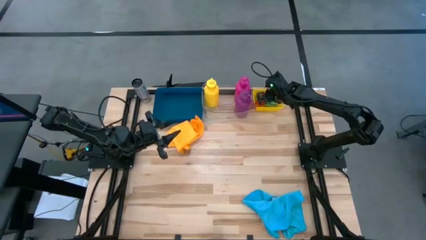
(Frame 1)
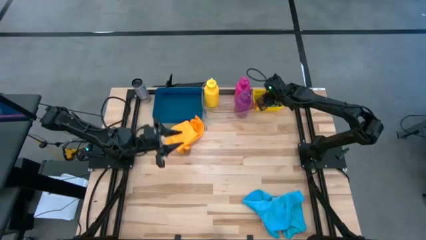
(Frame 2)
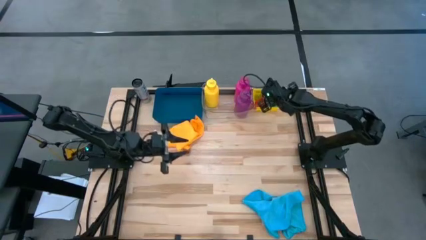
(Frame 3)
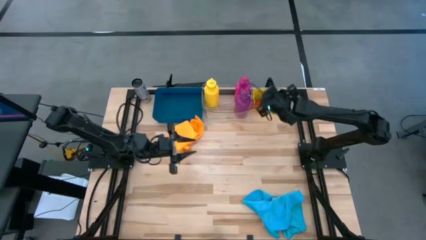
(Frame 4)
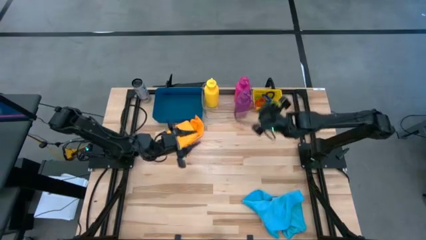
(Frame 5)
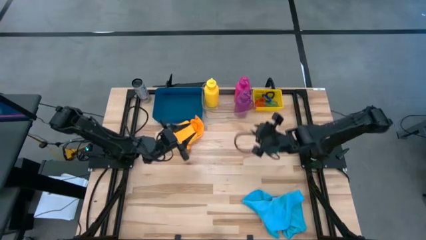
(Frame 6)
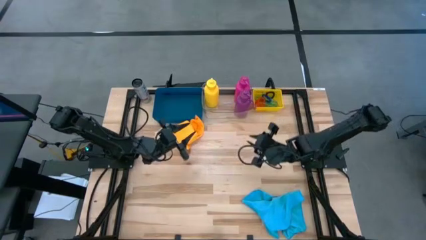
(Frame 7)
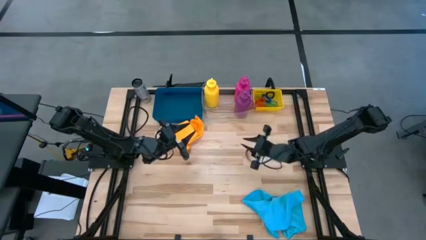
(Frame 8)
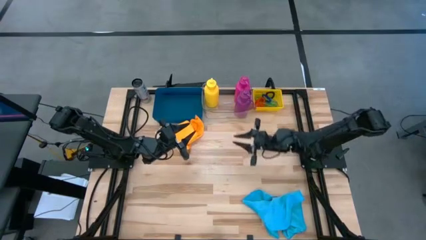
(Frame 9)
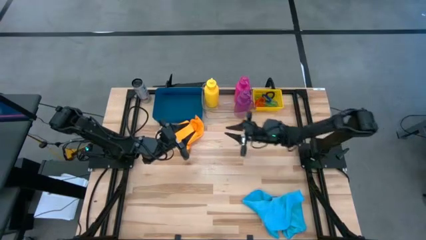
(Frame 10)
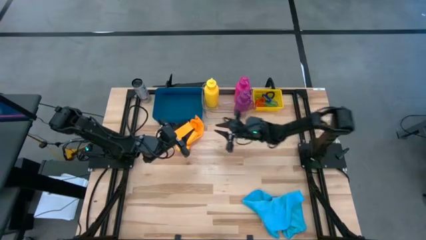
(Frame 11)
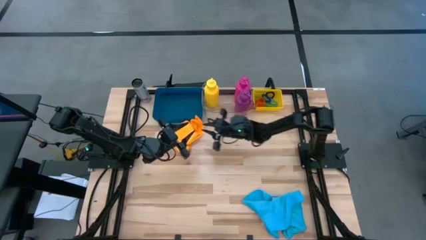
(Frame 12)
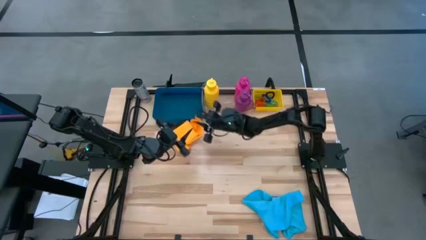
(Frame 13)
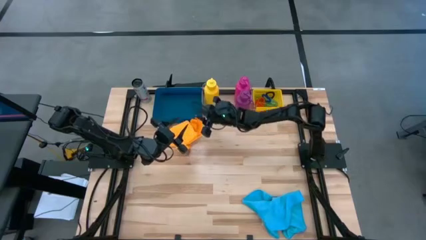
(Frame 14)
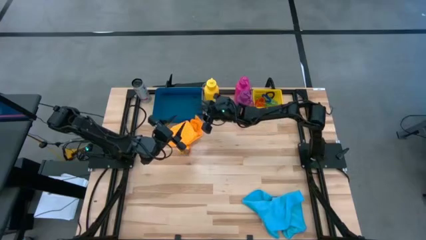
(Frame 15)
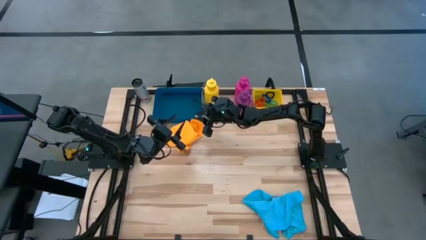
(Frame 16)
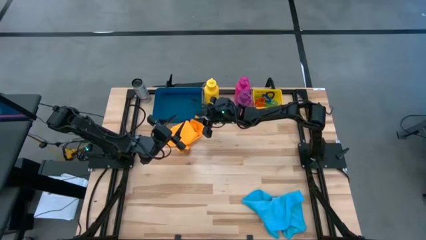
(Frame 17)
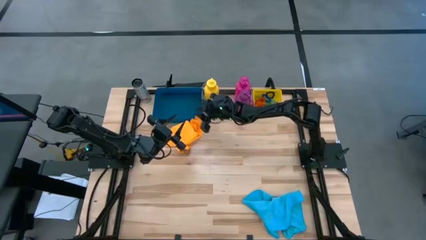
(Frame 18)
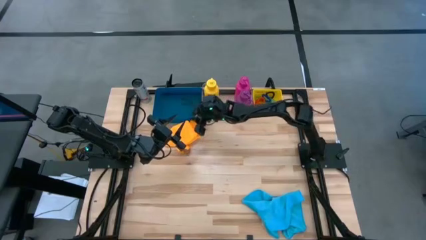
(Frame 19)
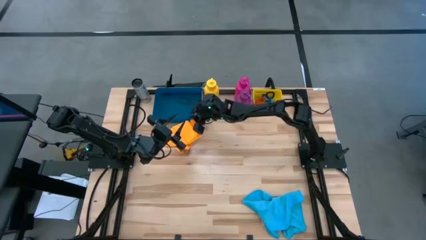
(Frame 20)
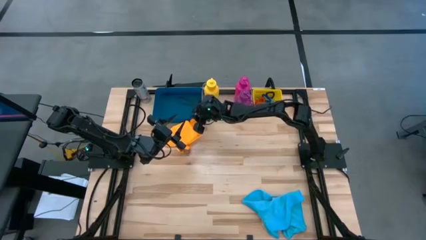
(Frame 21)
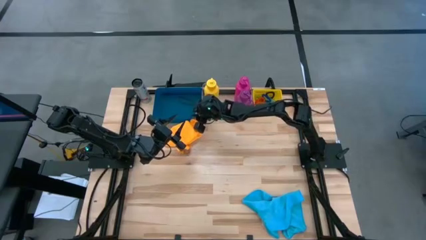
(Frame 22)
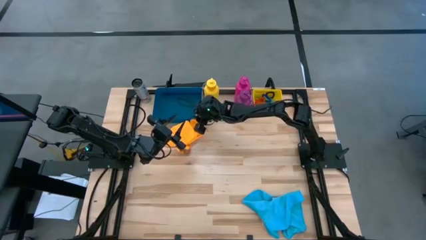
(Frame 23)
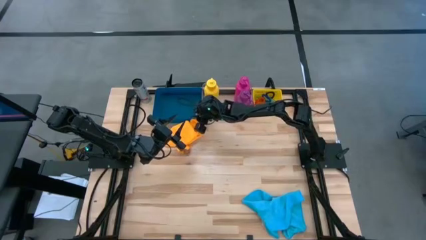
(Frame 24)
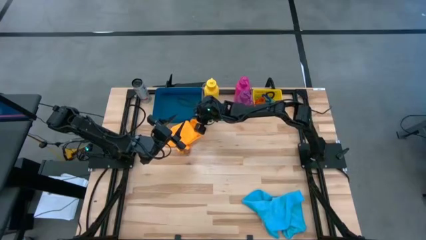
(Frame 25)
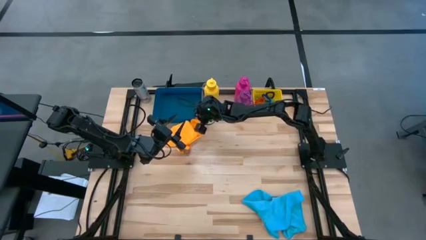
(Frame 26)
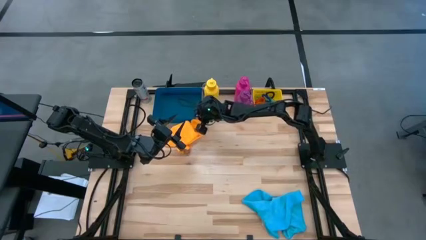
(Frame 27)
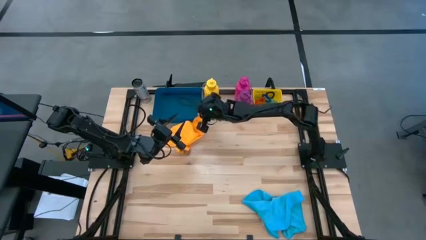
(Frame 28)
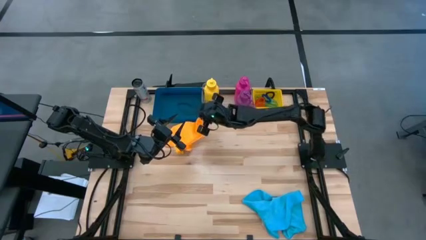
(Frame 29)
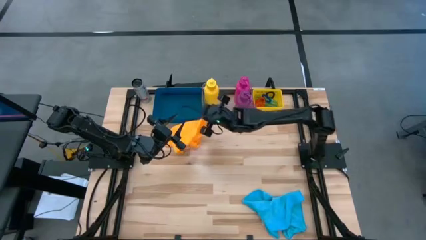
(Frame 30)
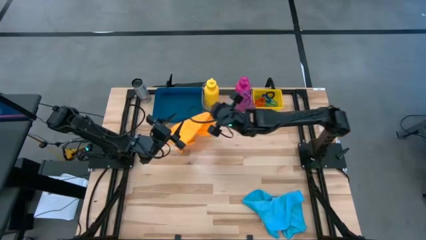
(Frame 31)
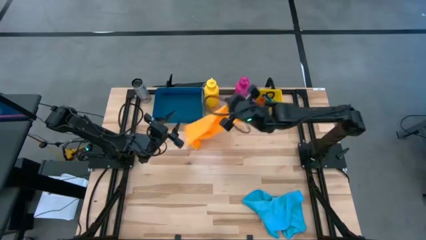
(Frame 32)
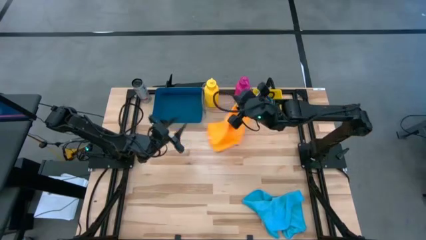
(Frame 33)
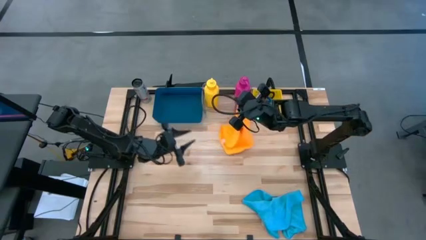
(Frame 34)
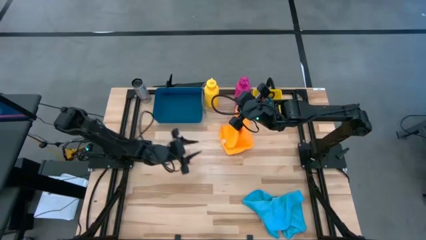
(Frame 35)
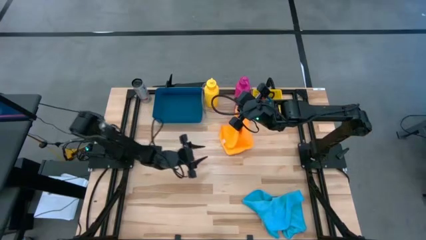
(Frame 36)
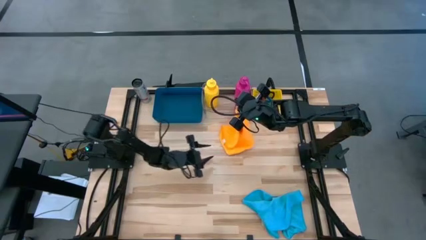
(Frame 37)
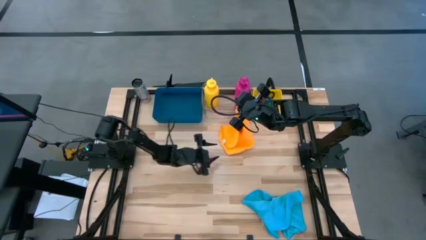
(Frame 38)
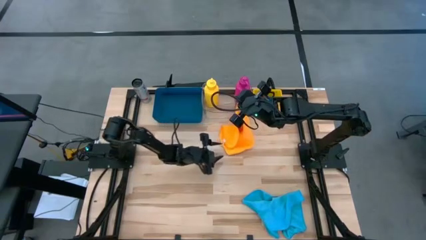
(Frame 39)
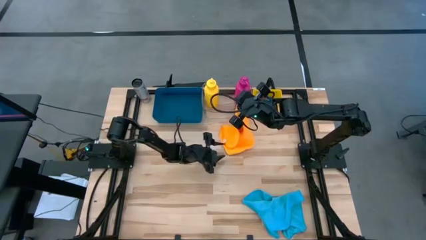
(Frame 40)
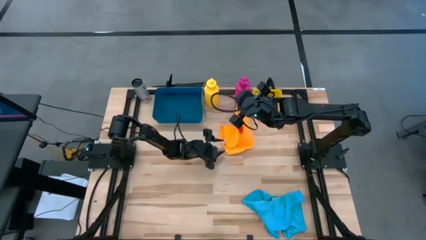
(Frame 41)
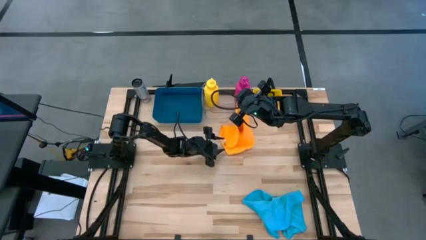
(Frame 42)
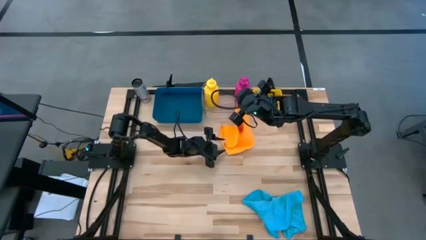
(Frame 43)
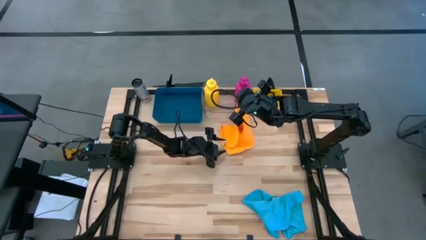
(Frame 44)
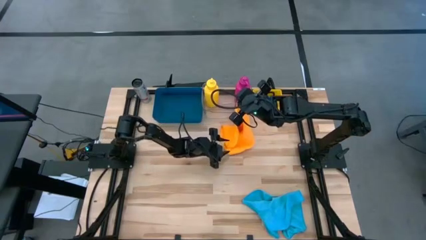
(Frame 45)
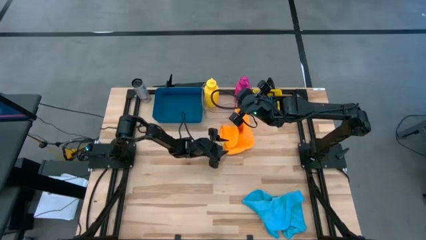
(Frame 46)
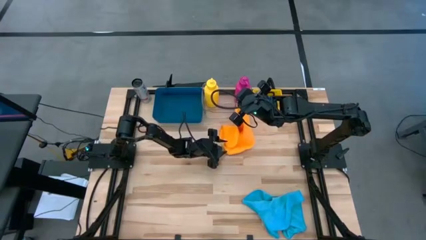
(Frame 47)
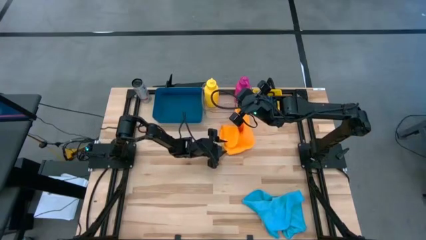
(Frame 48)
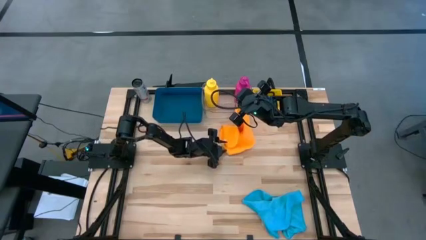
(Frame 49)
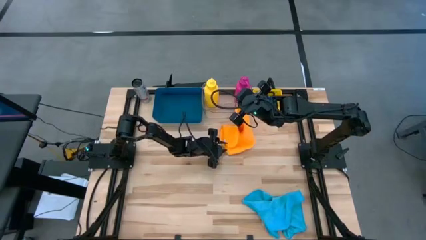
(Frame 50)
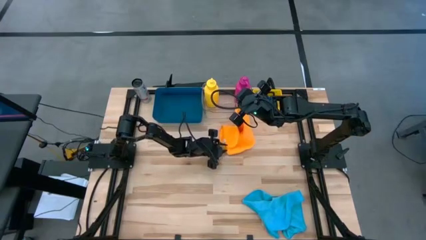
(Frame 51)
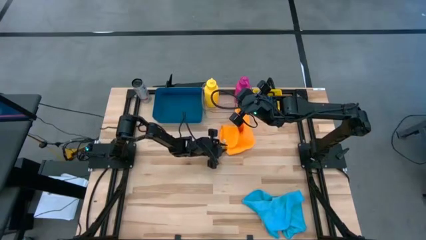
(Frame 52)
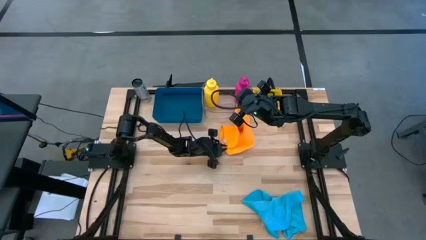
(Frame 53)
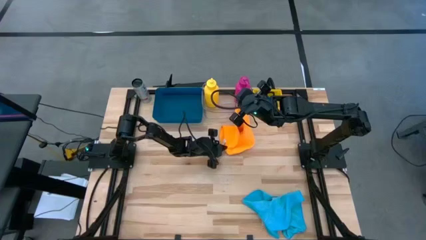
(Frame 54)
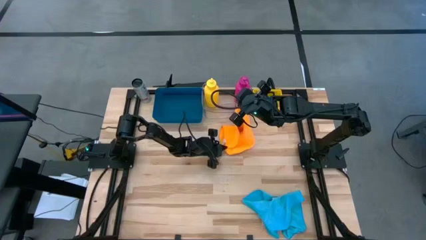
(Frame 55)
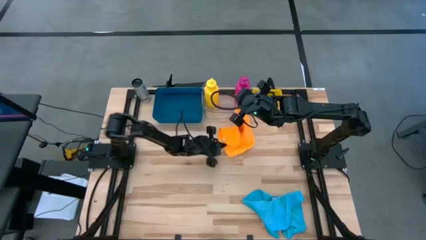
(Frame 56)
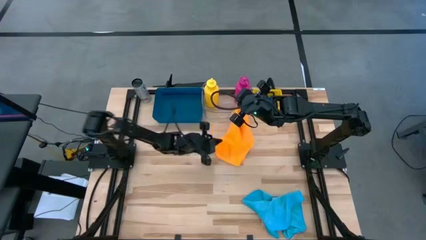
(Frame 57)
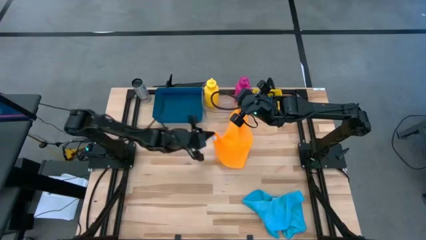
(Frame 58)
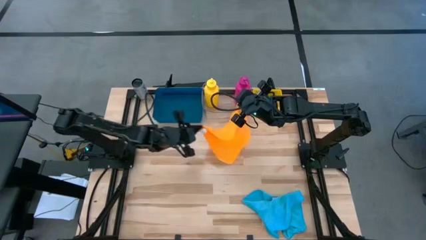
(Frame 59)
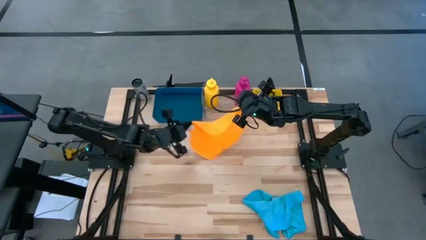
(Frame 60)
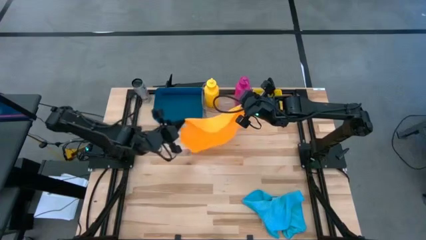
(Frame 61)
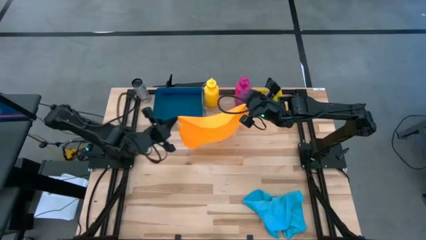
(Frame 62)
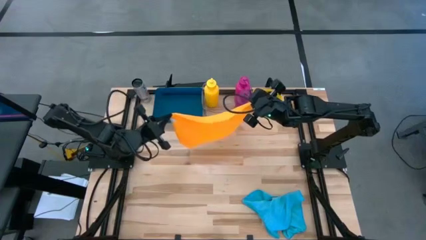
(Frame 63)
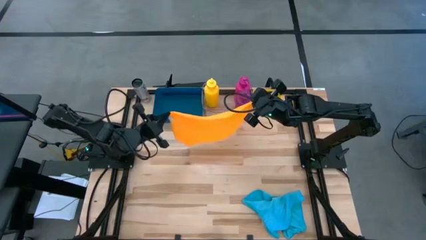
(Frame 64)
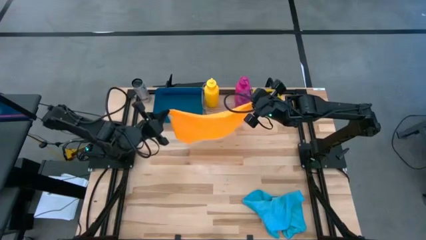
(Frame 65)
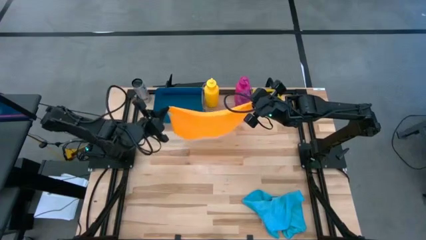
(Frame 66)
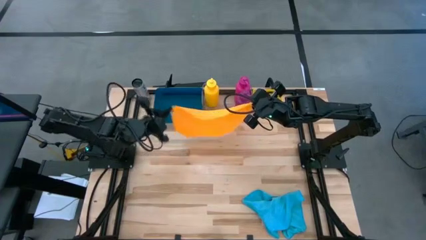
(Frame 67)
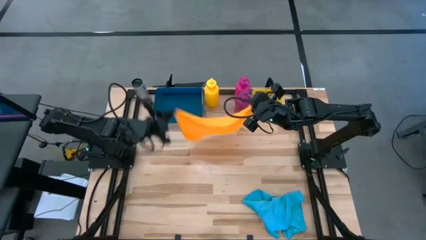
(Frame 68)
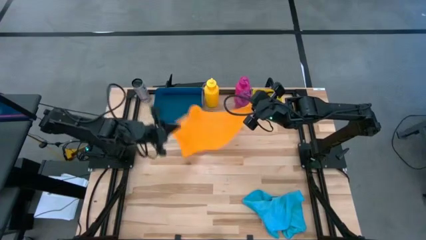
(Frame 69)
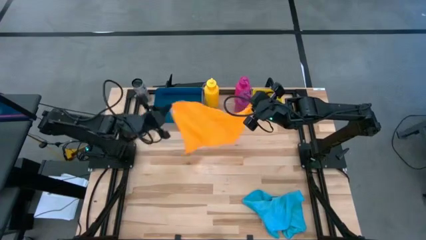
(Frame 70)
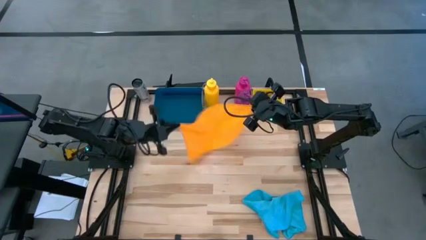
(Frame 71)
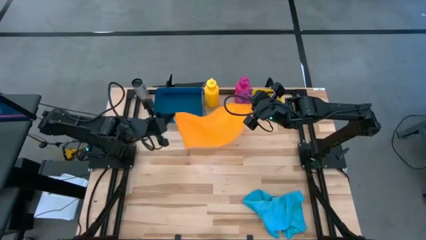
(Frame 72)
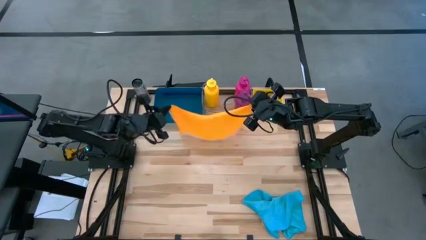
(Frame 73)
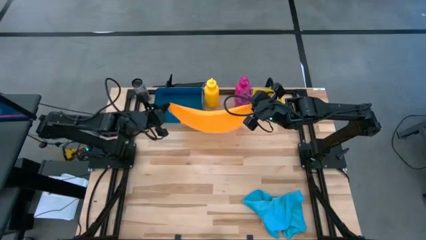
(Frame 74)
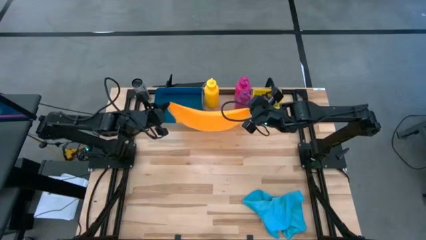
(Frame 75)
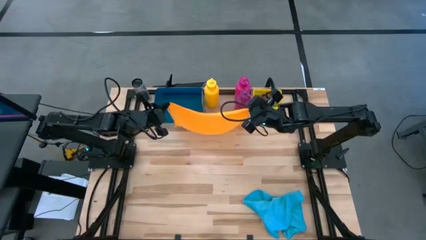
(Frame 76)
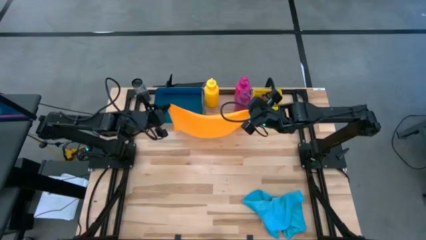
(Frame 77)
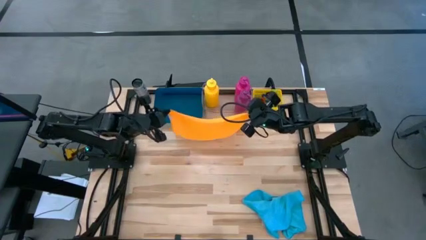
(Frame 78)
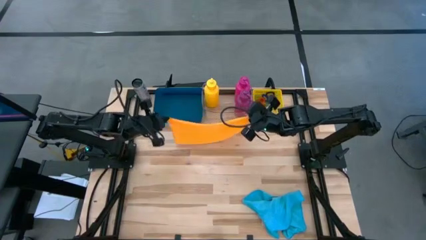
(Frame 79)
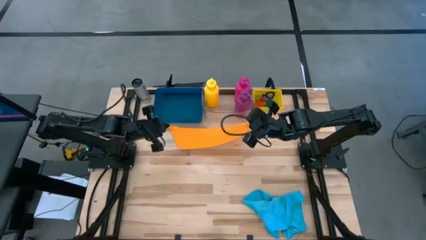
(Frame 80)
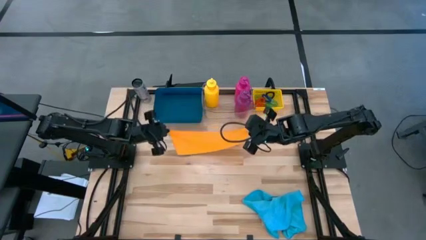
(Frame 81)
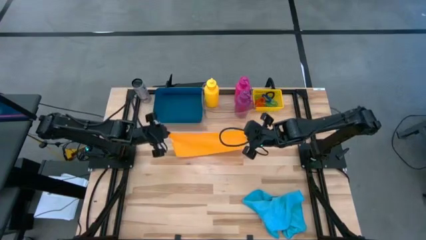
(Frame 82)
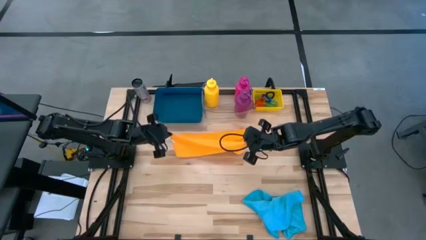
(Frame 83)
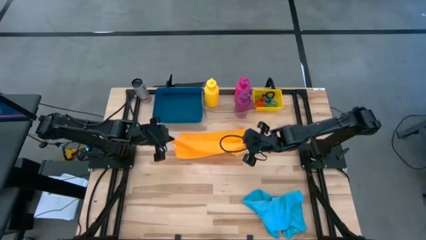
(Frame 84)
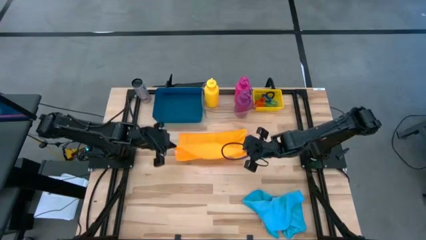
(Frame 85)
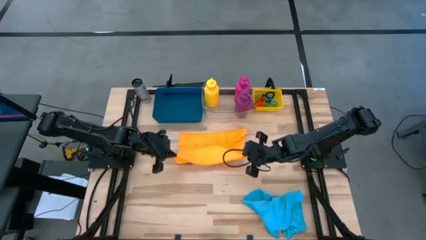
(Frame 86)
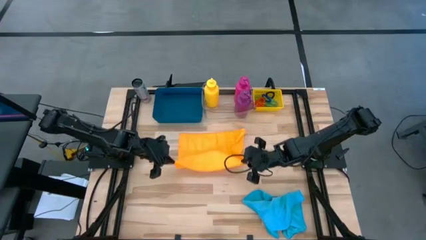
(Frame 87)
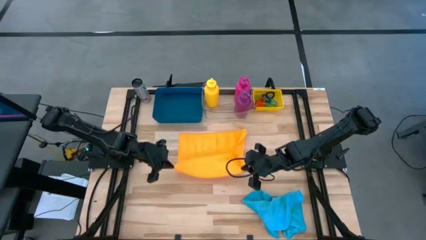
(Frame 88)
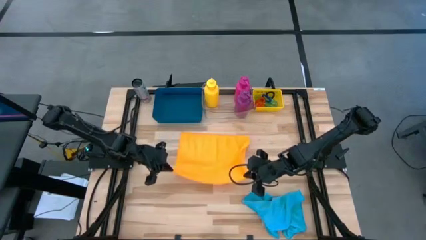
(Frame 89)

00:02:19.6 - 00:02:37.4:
Task: Pick & Place Sports Items
Fold the orange towel
